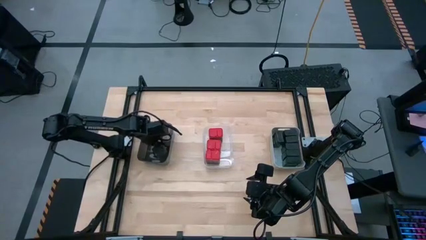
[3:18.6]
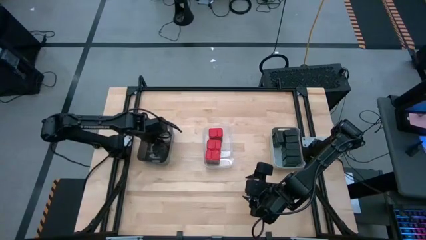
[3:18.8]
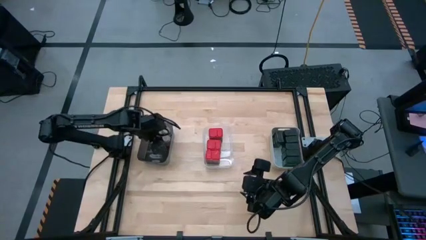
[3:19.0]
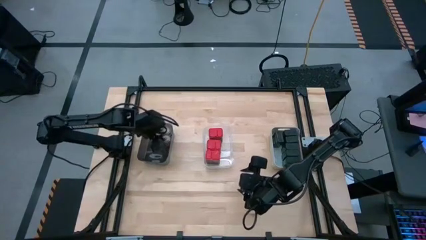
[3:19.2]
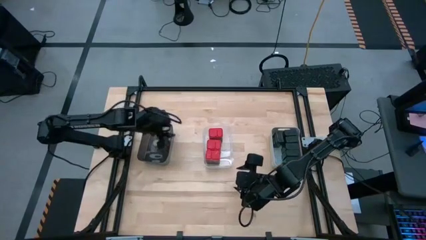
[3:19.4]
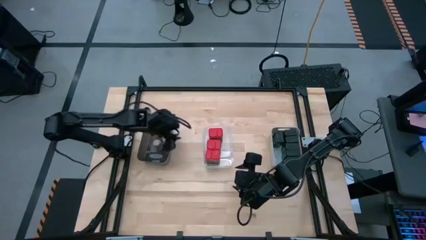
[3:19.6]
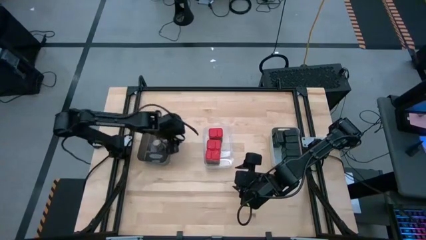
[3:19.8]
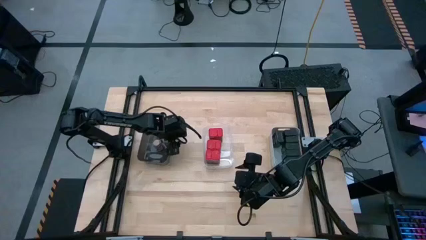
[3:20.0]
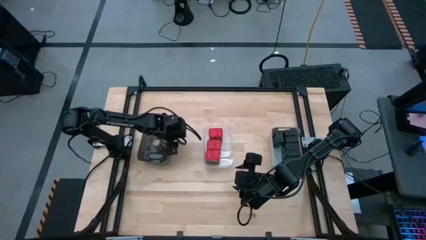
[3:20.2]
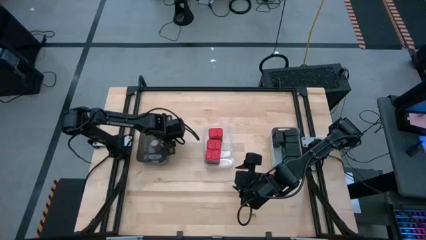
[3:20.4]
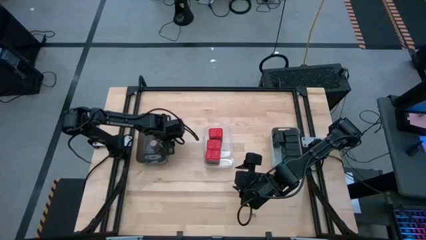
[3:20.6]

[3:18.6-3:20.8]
Task: Sort spices by type
Adjust the black bin on the table

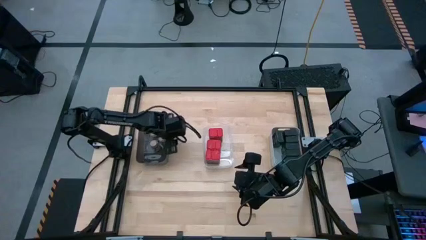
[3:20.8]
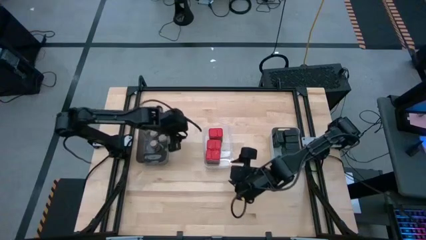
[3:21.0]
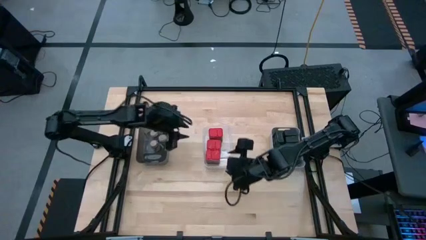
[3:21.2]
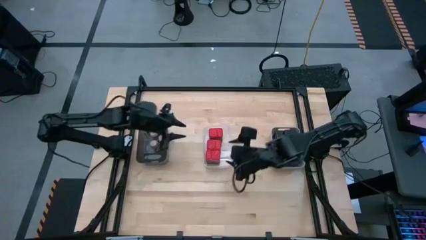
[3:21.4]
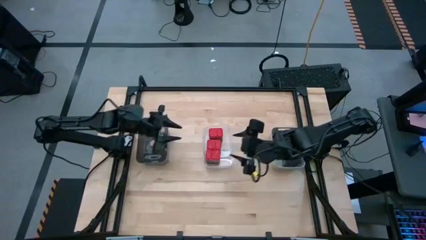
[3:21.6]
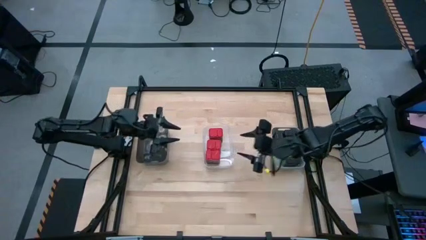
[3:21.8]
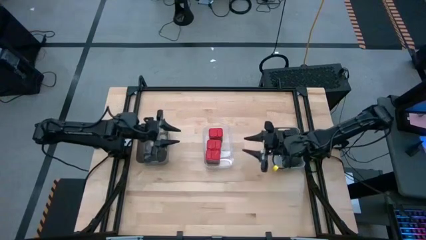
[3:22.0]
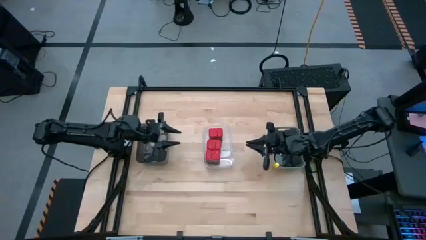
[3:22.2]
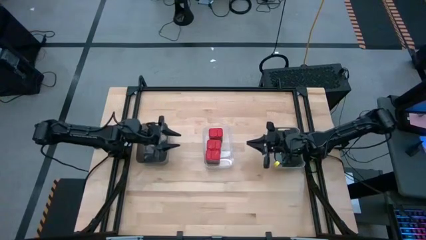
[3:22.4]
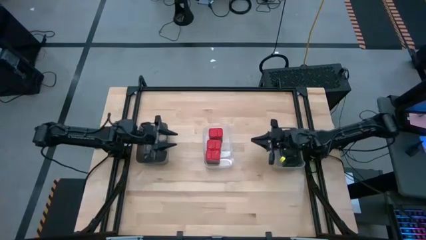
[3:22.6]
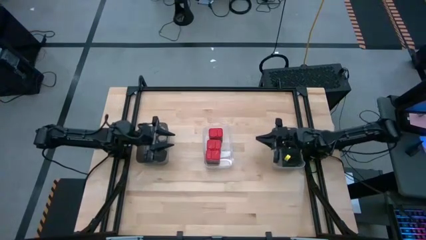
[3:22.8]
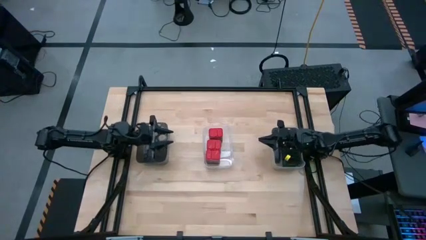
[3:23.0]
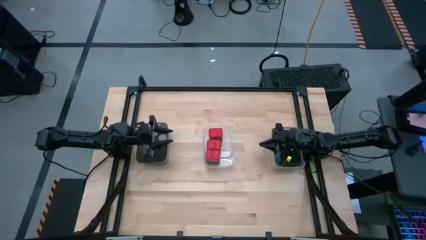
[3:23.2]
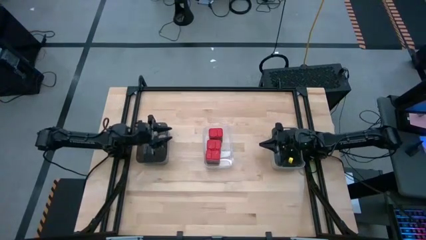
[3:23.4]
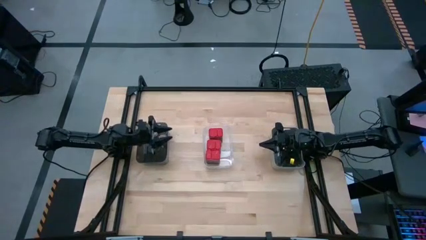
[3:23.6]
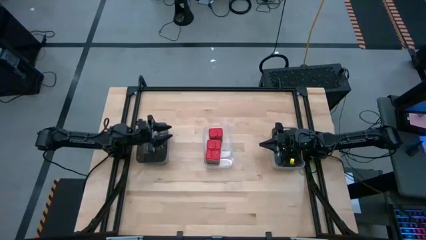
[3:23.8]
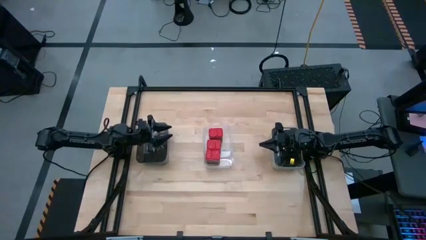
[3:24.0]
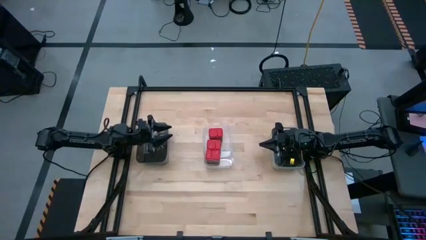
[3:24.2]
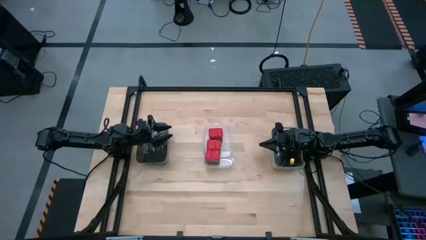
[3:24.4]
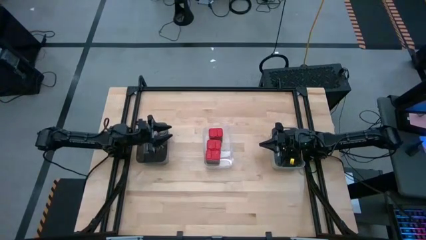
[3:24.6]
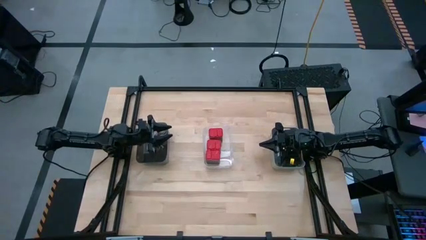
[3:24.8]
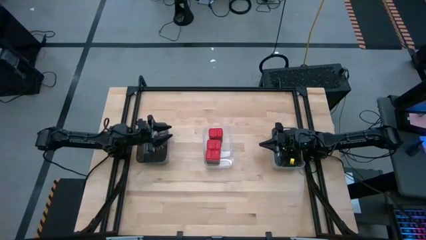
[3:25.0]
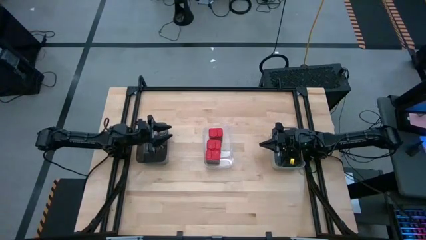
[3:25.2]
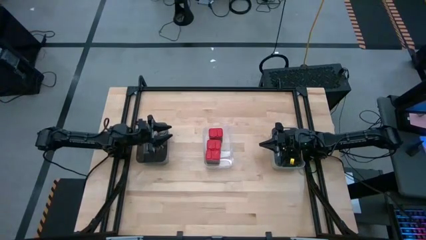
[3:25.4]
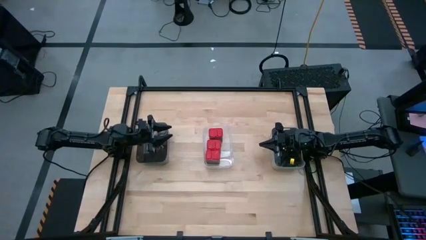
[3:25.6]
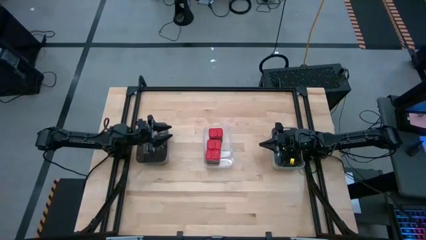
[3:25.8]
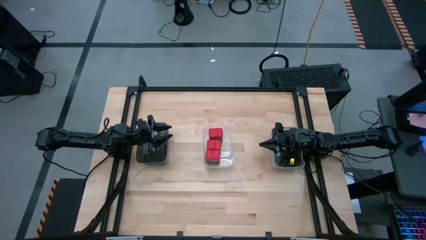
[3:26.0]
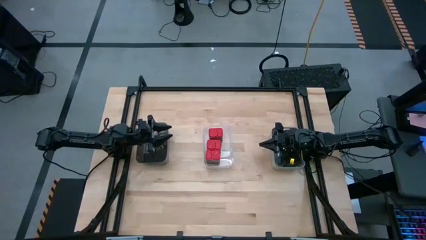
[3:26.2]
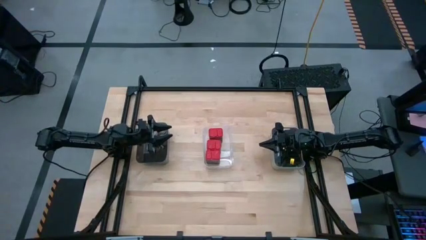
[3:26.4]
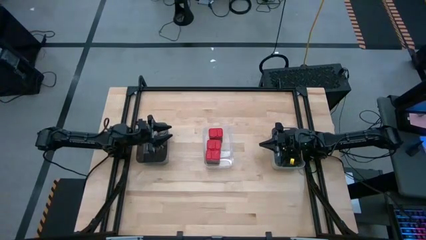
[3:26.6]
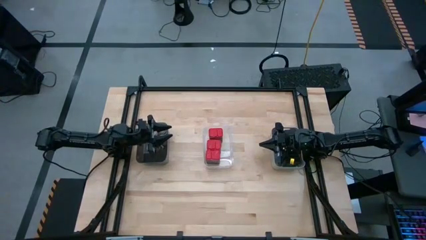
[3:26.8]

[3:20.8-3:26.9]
Return to Home Position

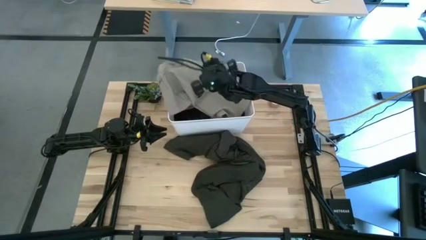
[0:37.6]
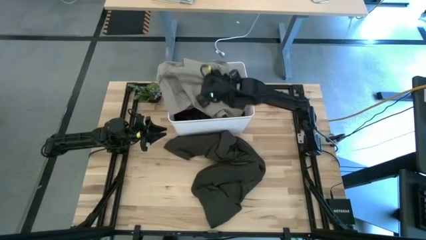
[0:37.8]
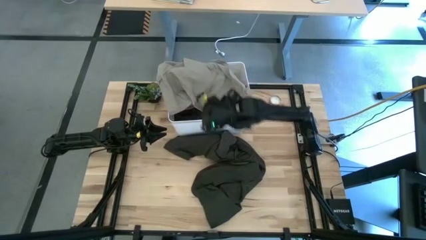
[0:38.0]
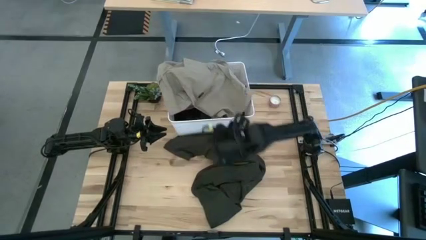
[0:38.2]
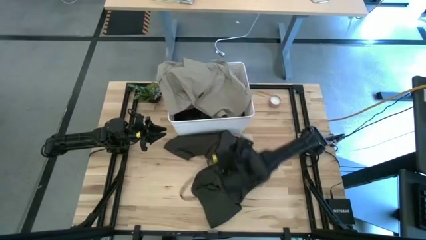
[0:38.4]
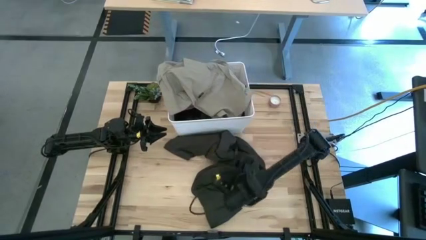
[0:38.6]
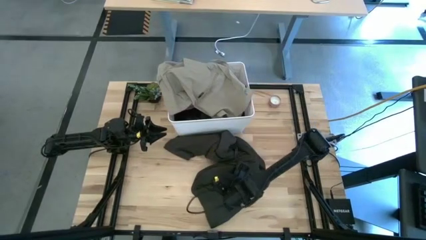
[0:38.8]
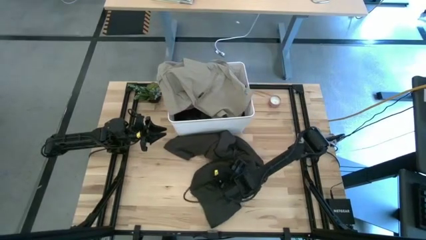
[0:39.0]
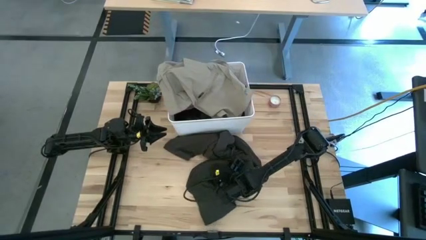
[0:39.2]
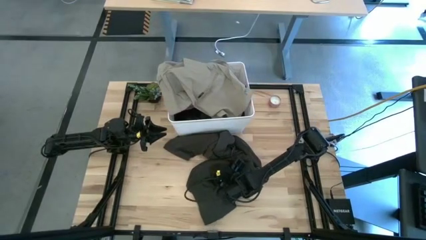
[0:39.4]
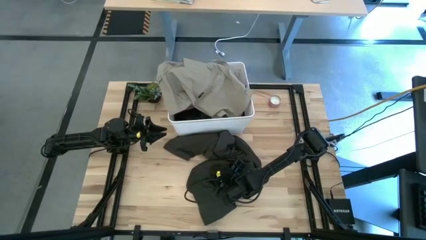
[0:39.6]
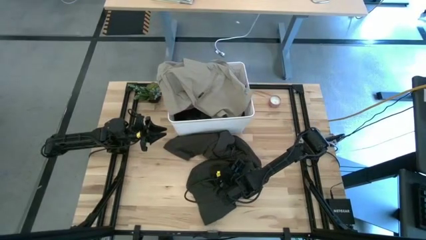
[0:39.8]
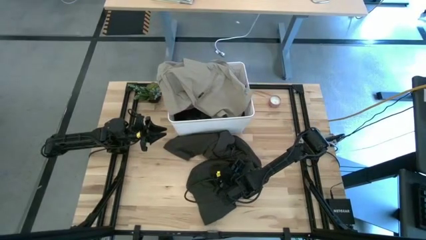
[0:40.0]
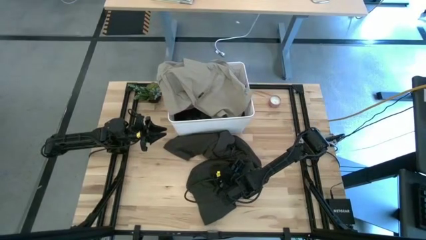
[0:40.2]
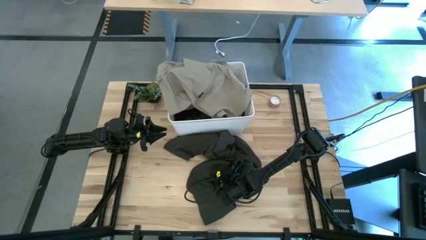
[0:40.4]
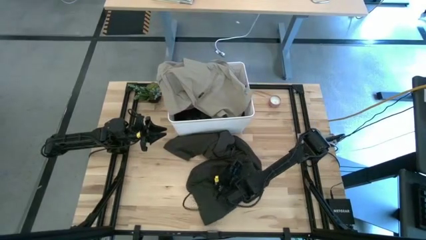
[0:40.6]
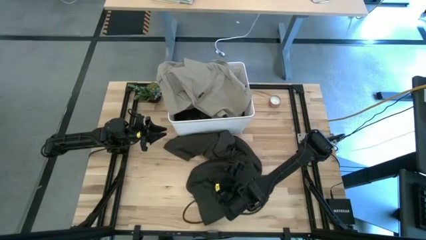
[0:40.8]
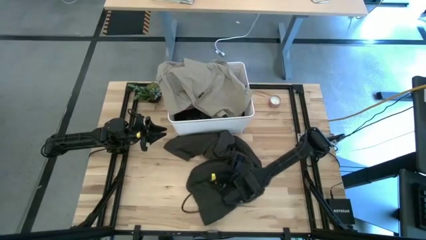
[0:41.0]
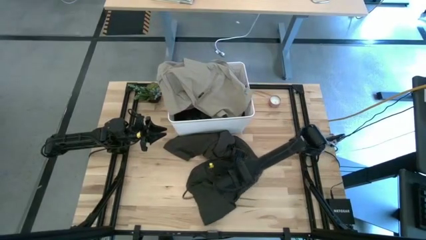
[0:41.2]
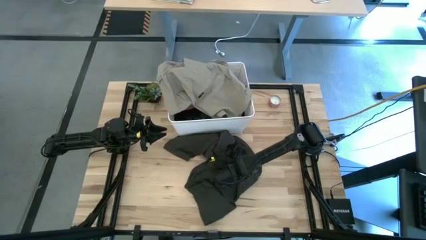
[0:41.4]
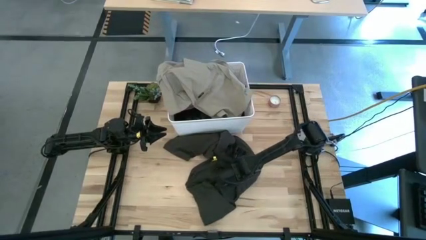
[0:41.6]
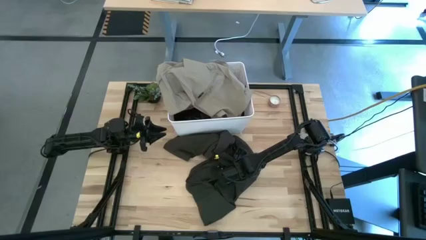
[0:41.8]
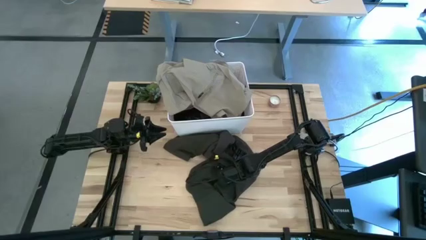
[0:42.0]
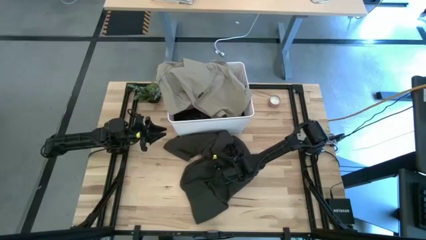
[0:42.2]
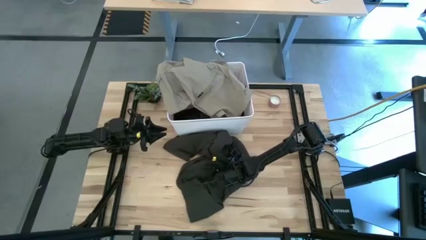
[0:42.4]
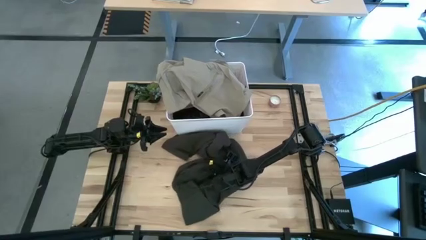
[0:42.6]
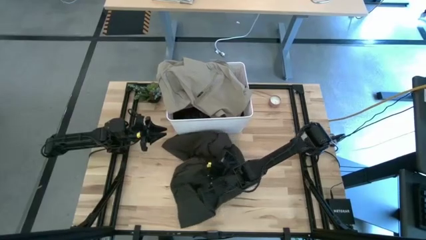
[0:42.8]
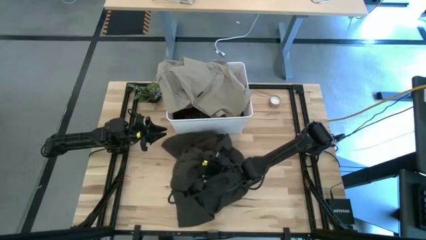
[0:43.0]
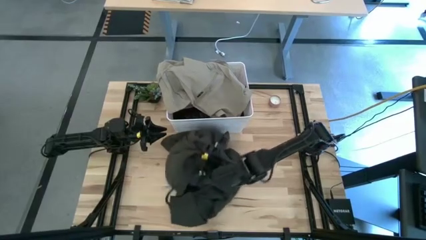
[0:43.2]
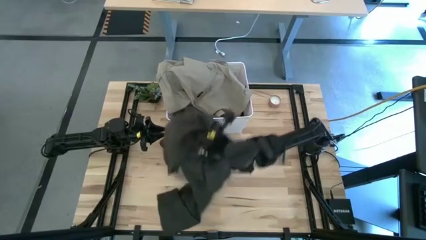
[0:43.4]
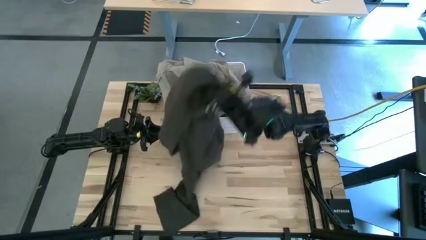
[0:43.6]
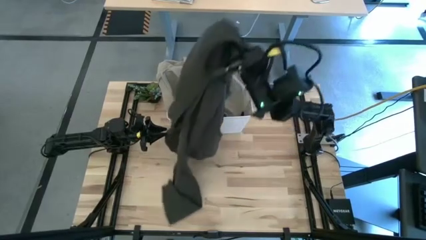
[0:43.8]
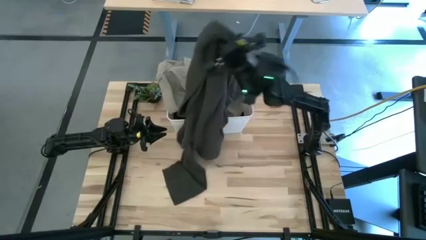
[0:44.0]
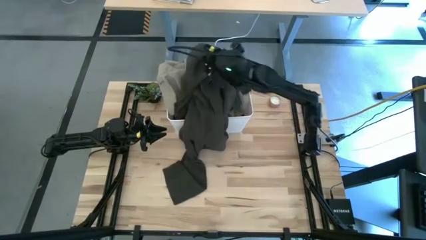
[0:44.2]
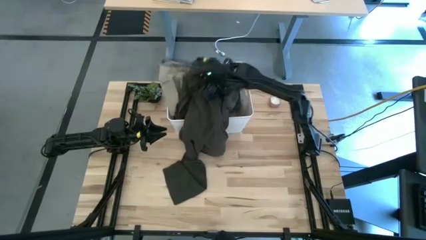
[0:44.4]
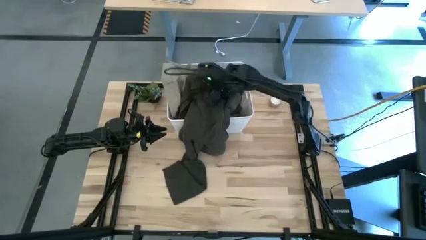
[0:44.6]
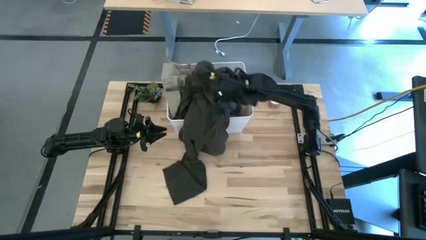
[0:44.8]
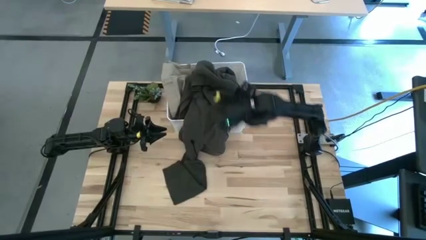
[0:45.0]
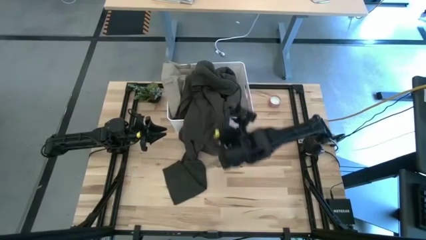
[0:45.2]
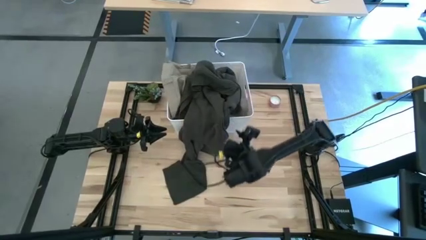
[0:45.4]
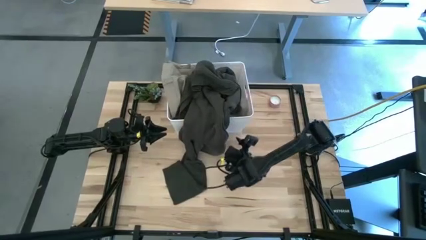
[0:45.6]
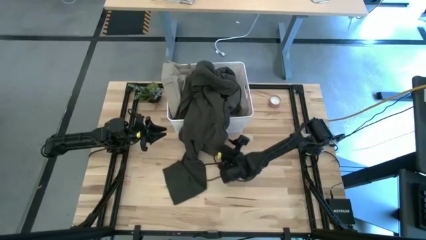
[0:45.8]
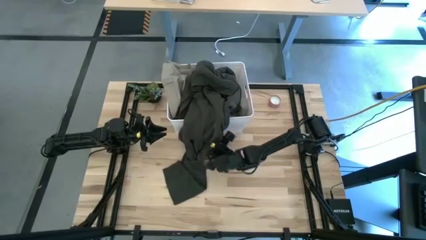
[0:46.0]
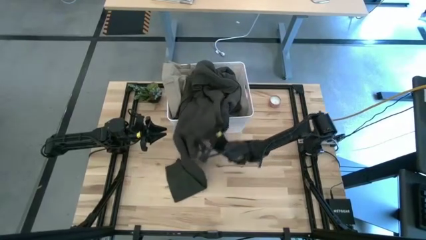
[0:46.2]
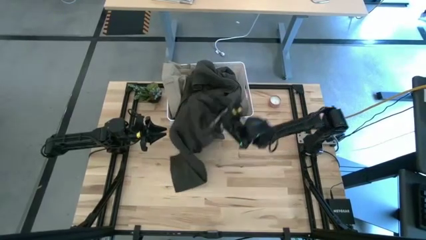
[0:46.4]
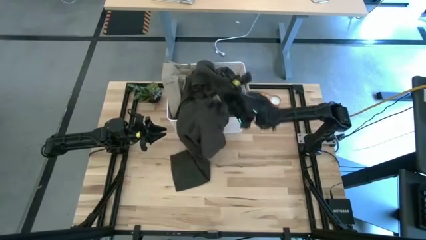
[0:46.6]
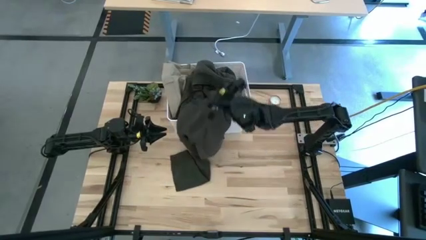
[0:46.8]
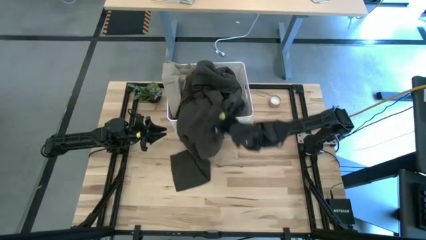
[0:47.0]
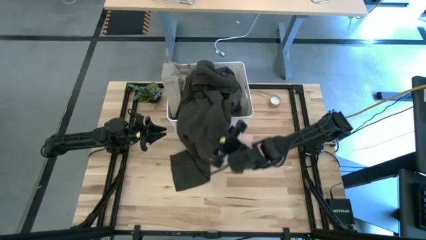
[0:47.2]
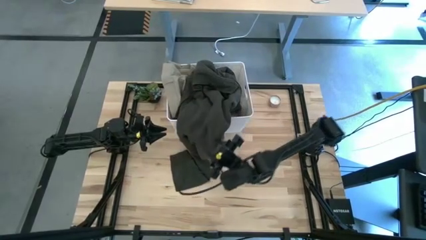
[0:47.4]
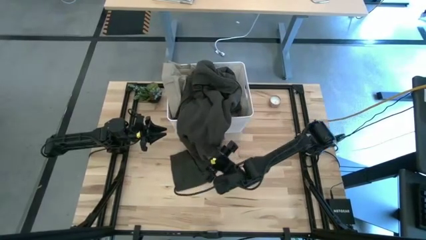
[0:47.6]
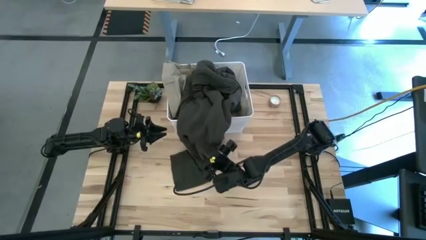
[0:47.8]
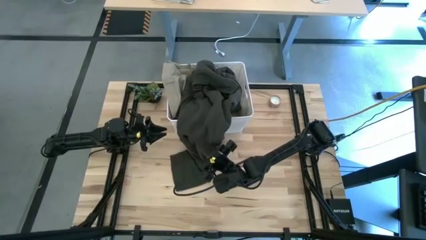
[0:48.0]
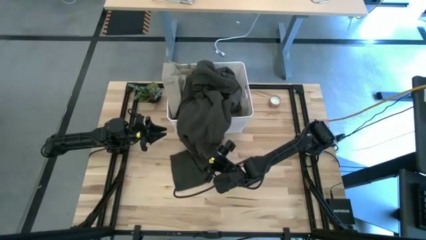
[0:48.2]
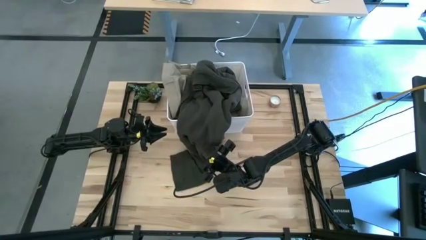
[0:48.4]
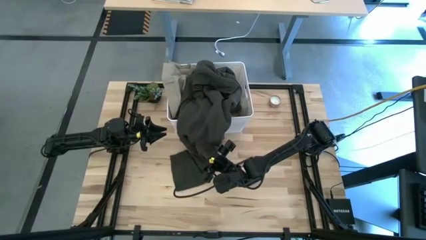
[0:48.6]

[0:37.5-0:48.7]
Task: Sort clothes
Put the green shirt into the white bin
